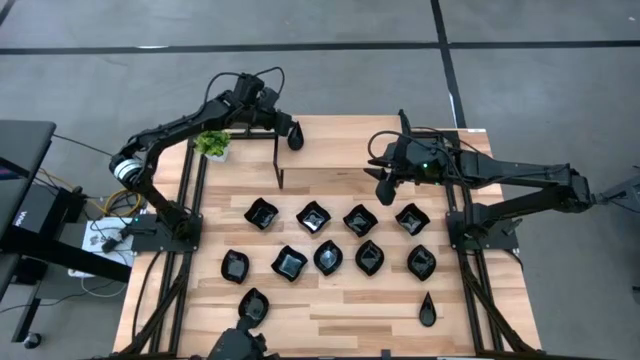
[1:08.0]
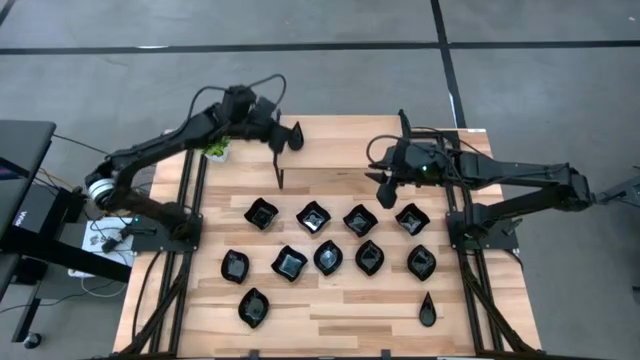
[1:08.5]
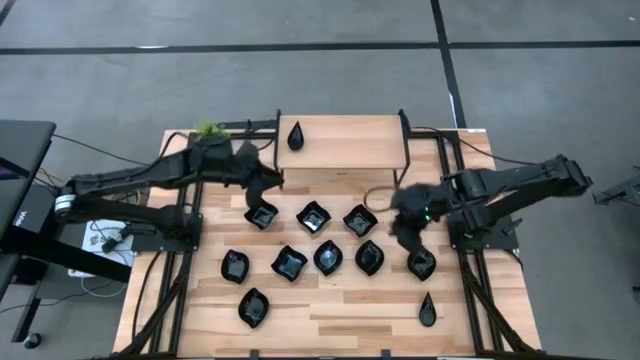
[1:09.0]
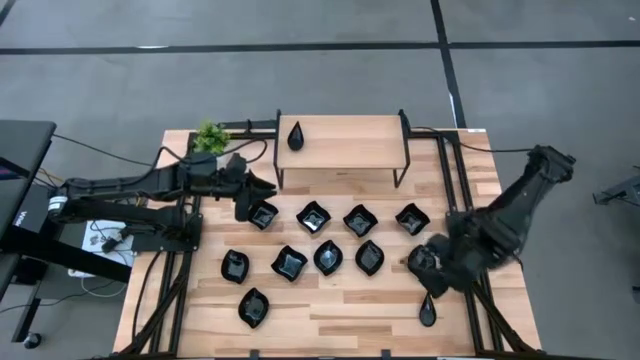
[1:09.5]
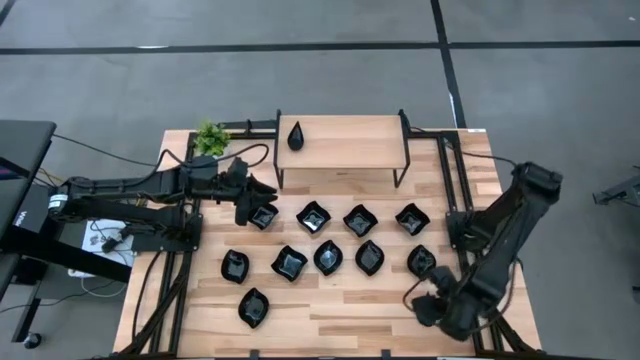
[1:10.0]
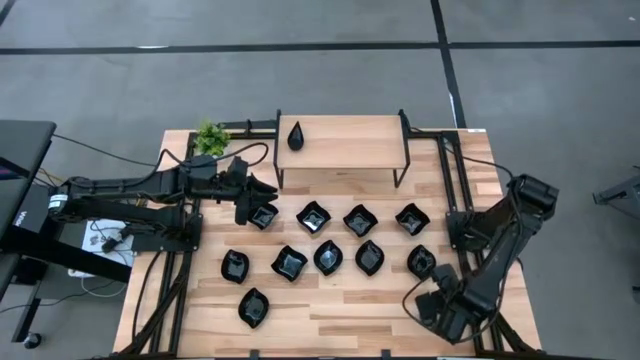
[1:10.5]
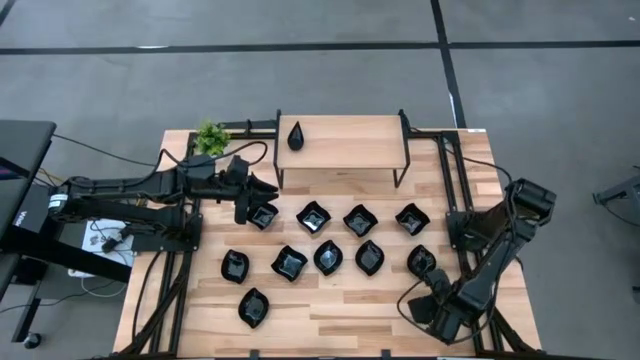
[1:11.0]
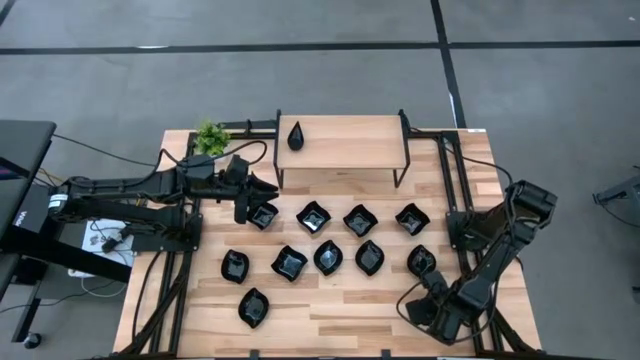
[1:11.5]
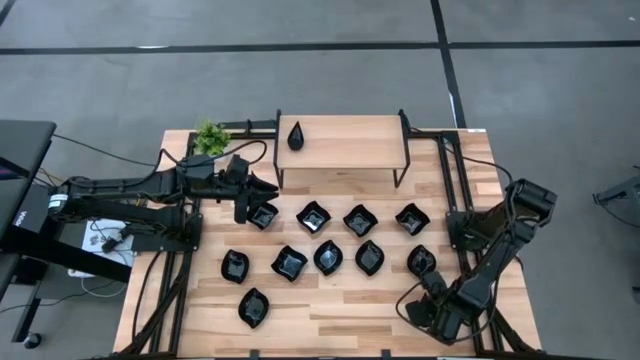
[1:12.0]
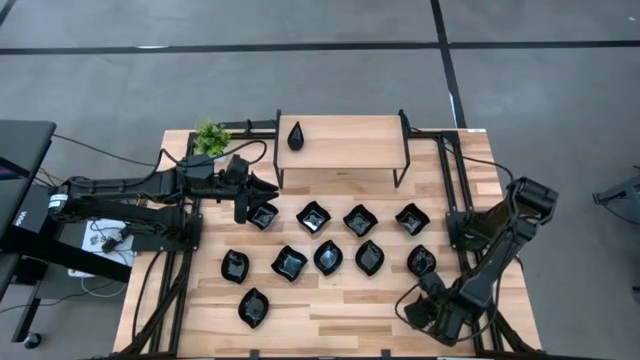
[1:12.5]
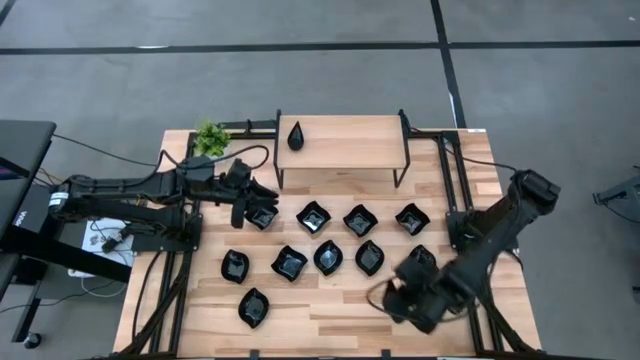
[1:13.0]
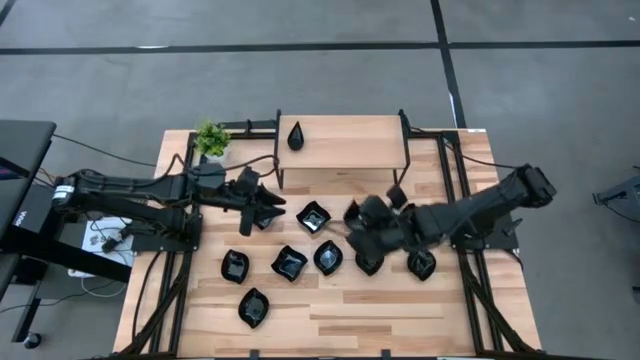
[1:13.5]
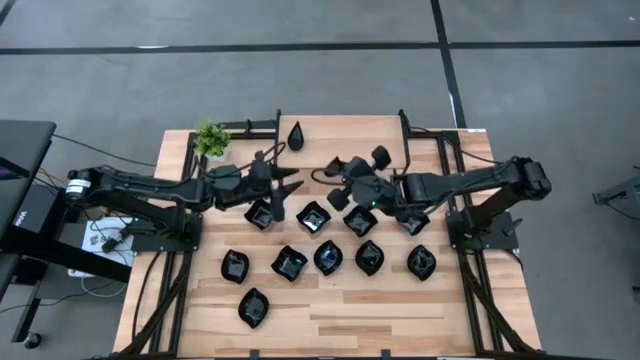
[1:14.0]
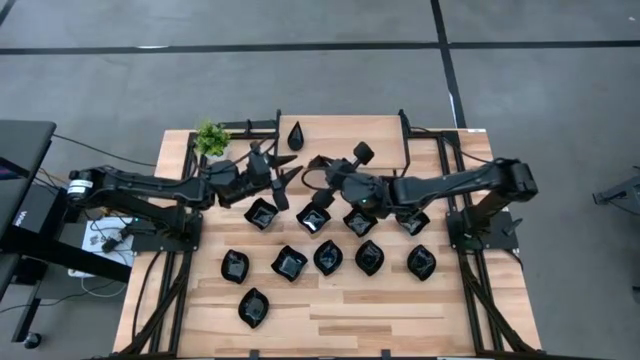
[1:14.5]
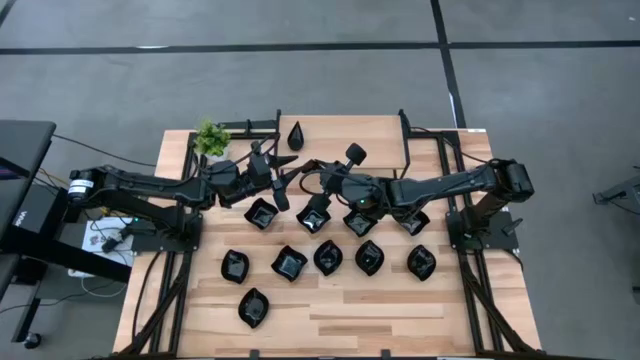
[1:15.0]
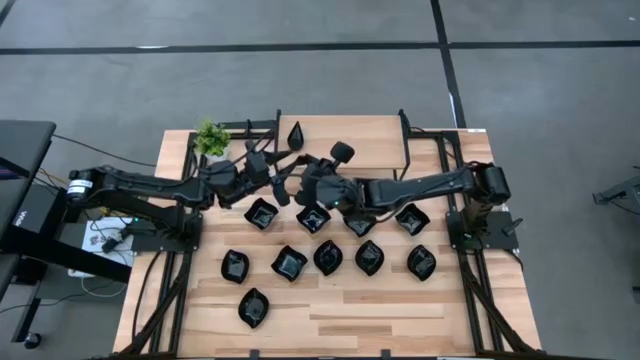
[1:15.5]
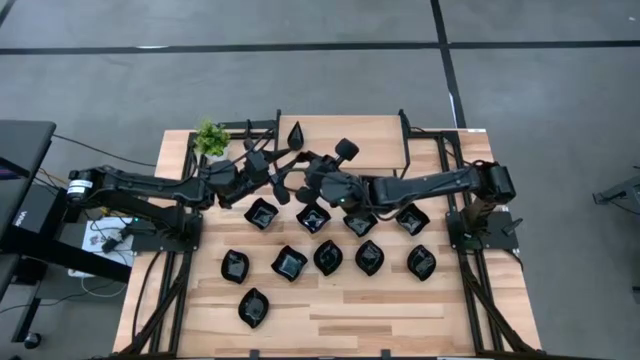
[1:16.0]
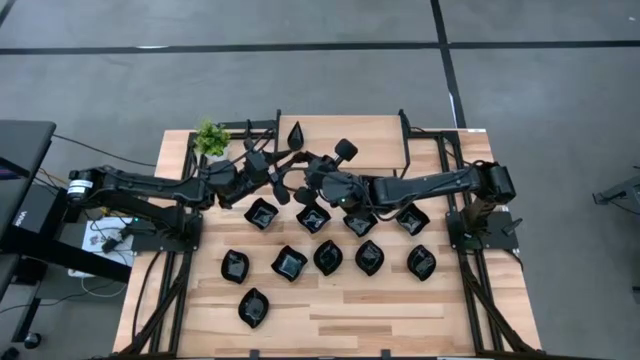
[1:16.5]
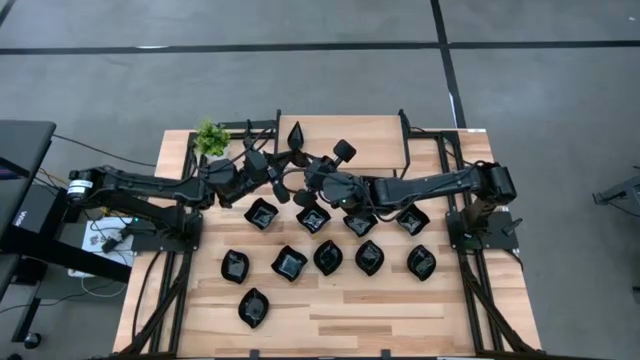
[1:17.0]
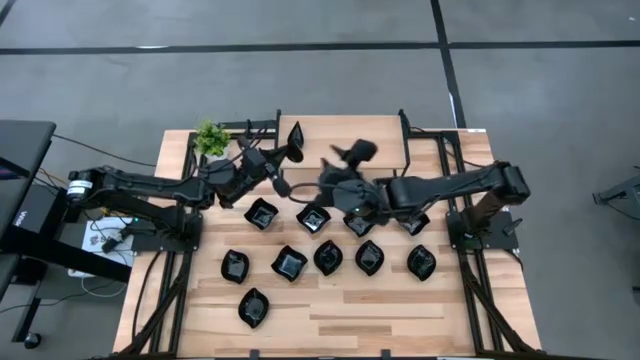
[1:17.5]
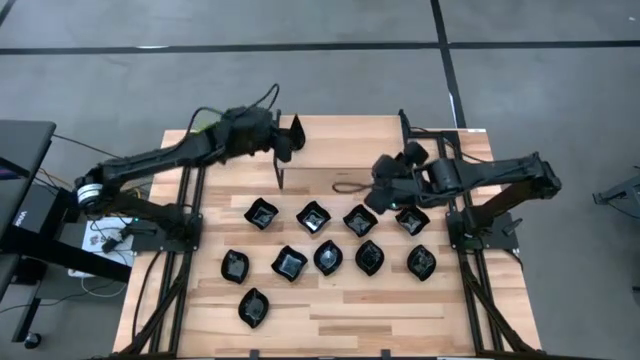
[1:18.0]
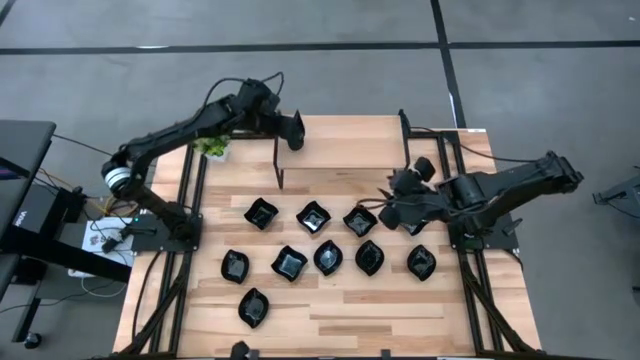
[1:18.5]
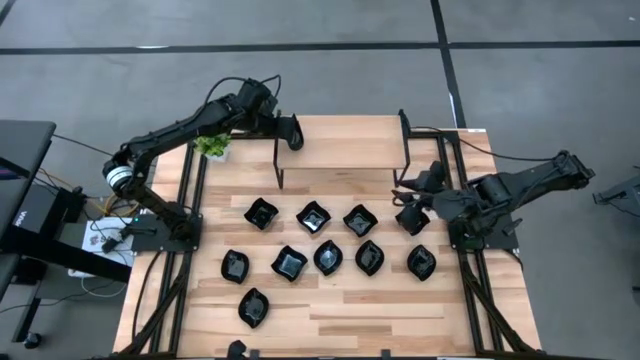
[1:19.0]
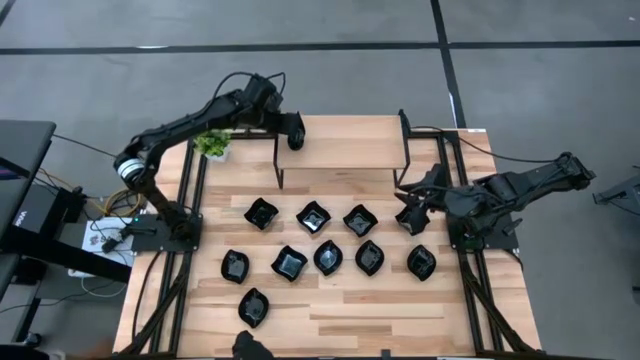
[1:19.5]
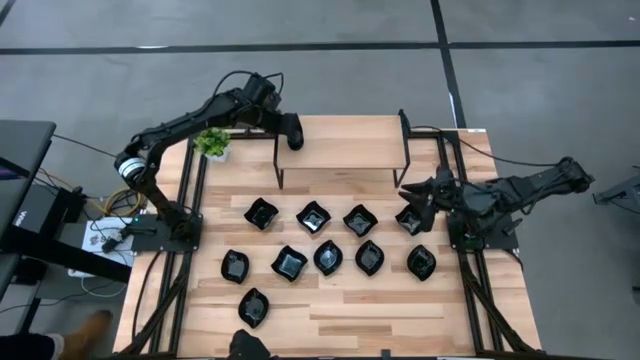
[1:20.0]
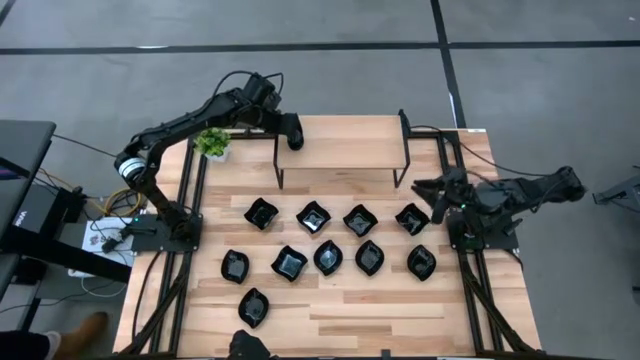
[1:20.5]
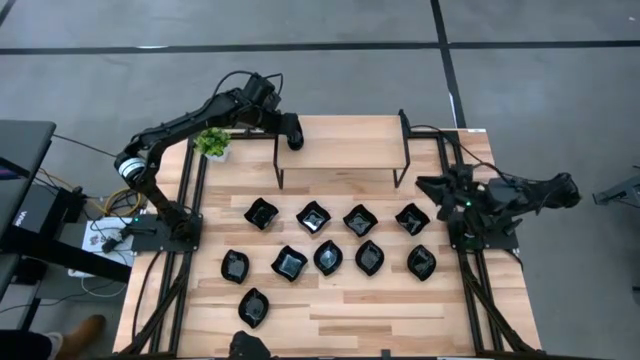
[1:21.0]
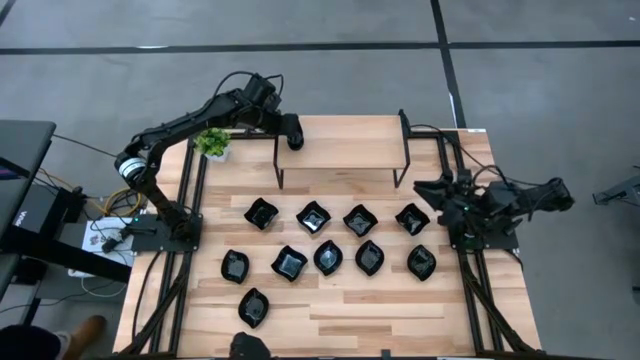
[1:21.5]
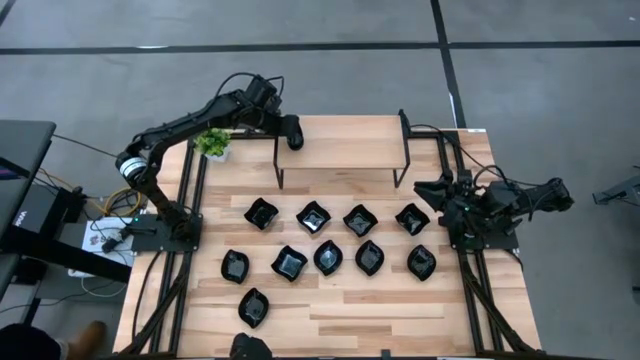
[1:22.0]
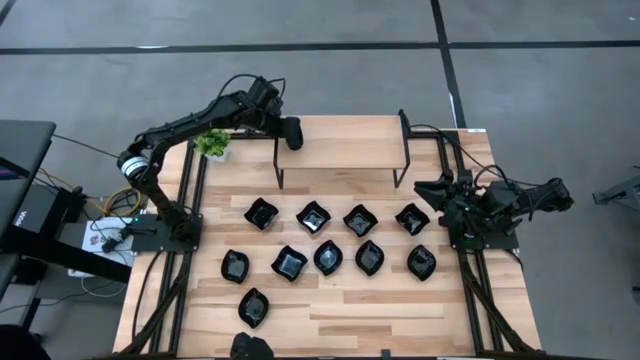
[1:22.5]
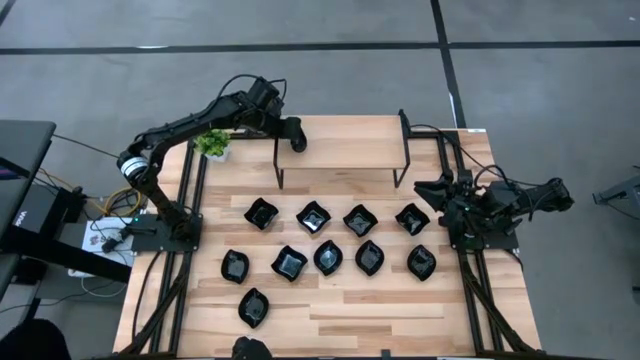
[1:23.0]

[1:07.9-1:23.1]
Task: Pick & Place Mini shaped plates
Stack the black drop shaped plate on top of the black drop shaped plates on the shelf

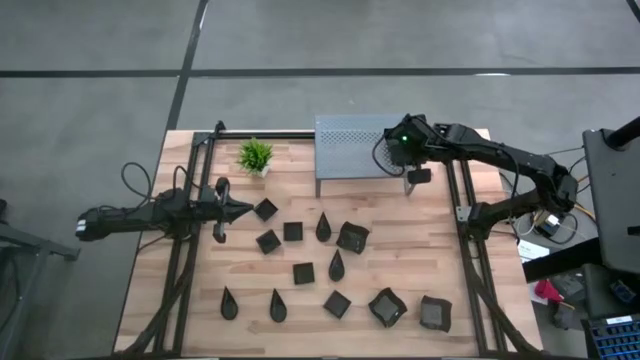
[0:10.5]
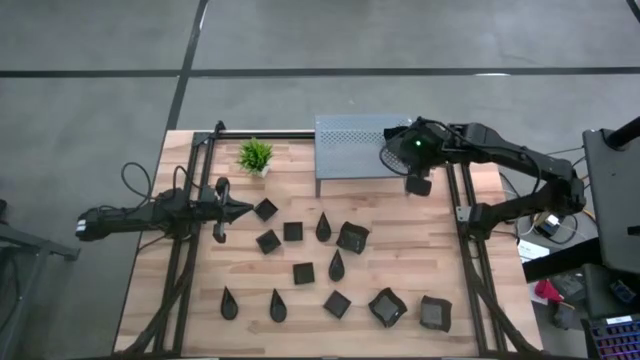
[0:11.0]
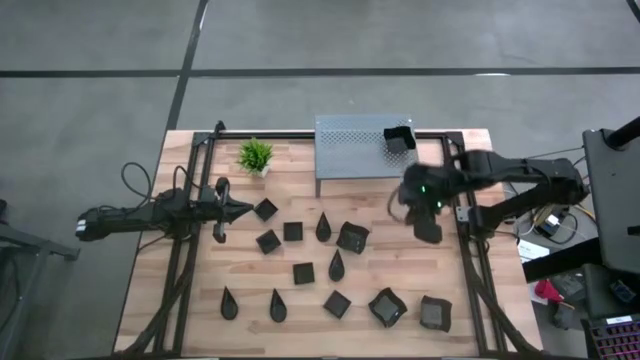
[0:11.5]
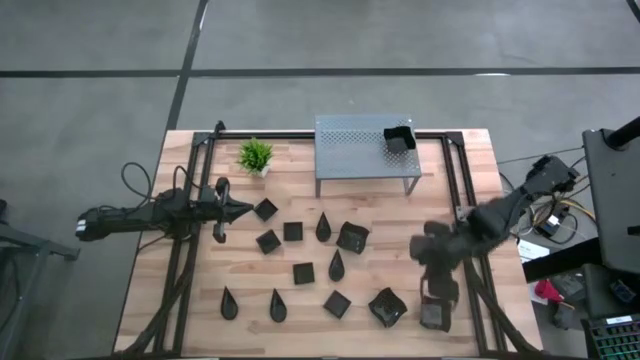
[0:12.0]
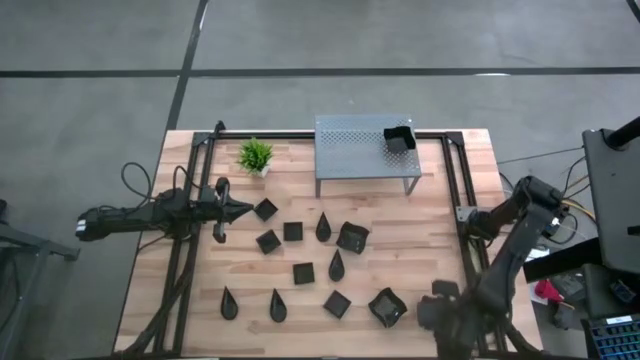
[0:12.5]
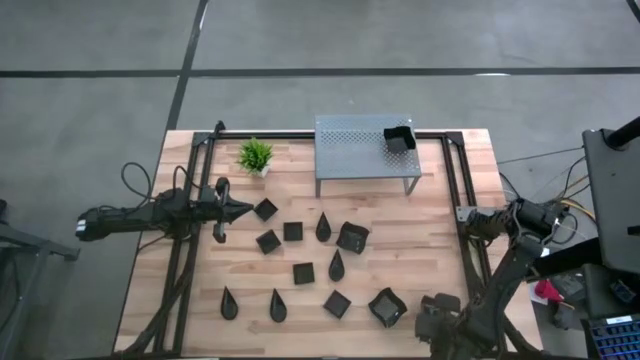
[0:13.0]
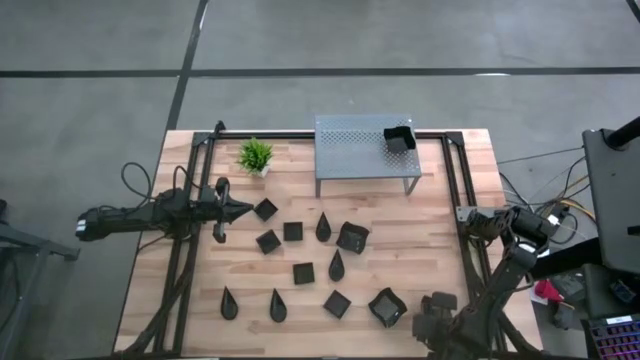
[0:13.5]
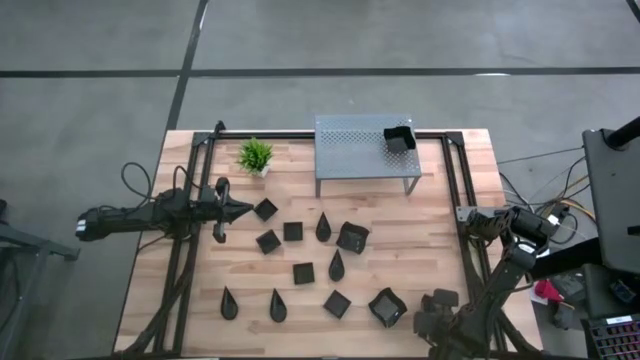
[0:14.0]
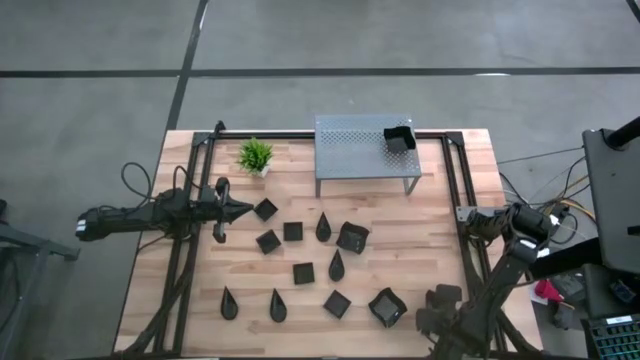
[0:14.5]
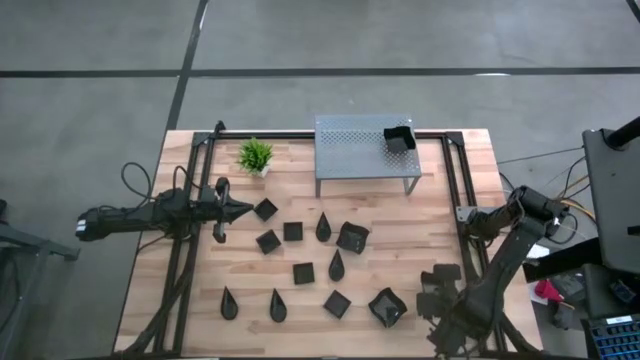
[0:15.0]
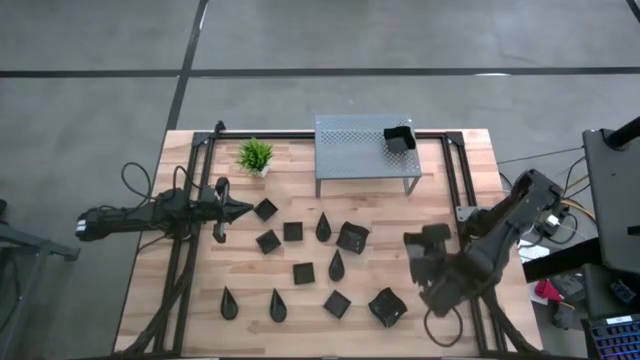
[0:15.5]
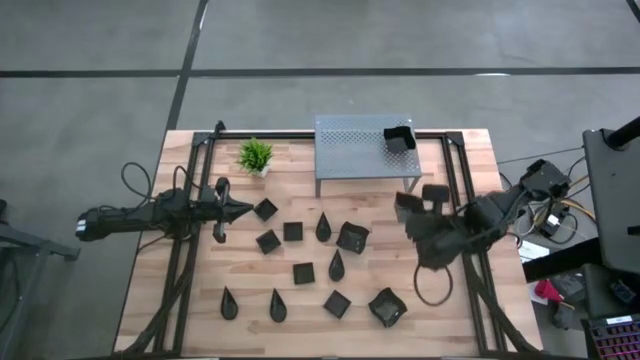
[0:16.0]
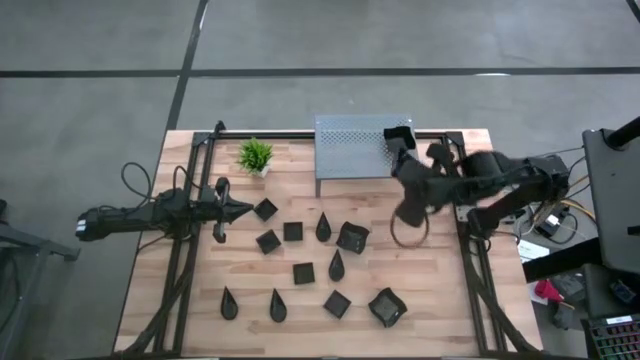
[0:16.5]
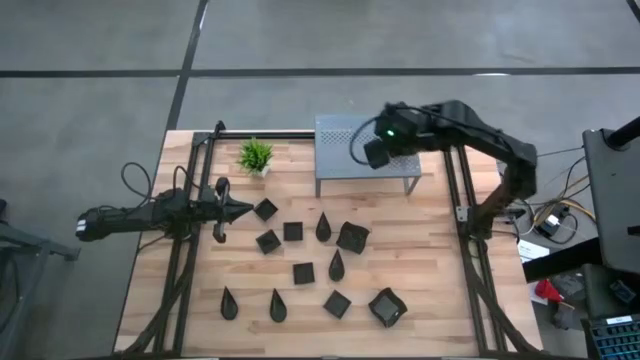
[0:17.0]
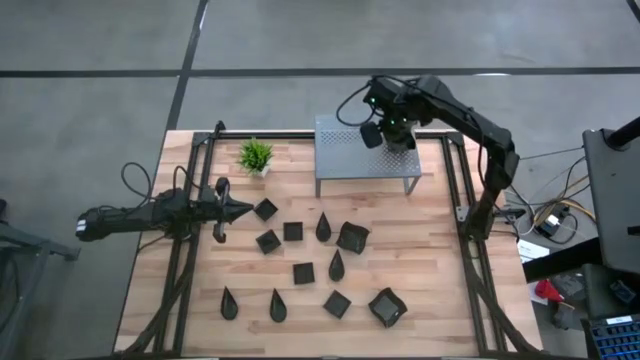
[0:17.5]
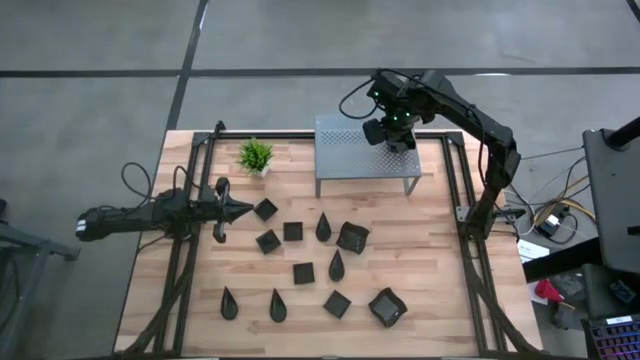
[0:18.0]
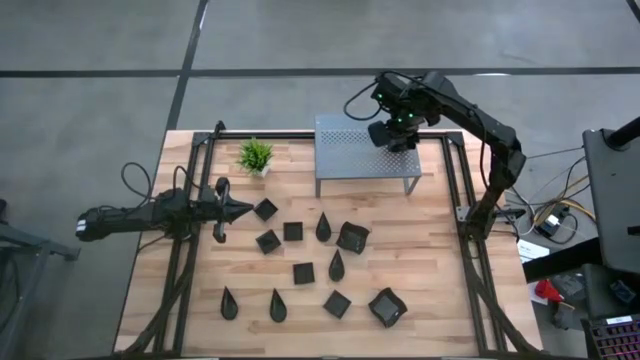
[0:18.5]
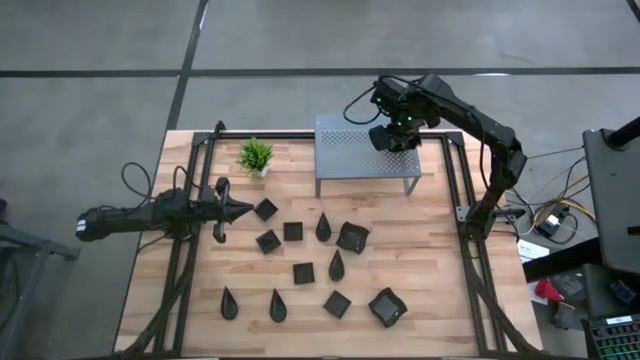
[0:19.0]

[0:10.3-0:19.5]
Task: Pick & Place Mini shaped plates
Stack the black distorted square plate on top of the black distorted square plate on the shelf
